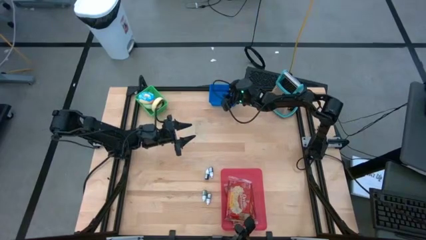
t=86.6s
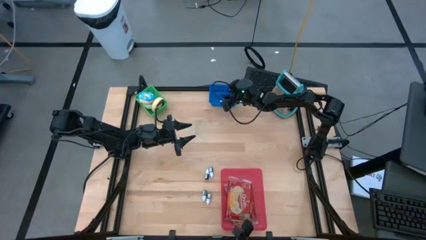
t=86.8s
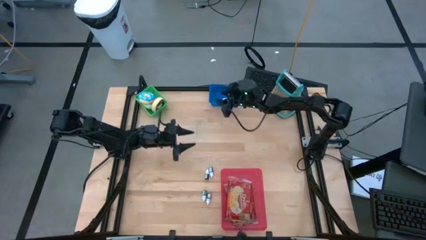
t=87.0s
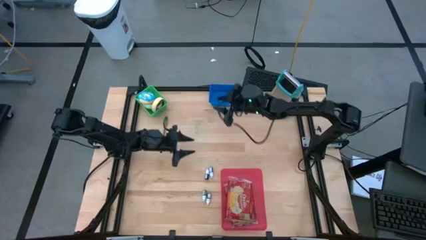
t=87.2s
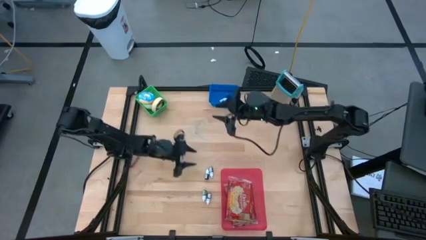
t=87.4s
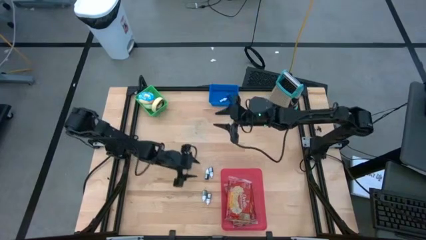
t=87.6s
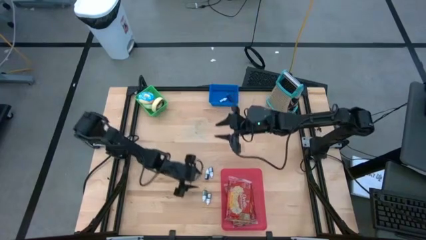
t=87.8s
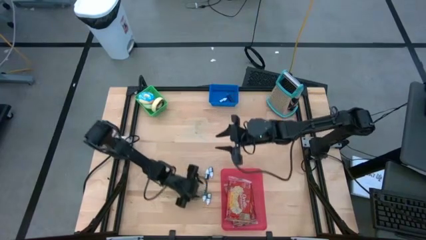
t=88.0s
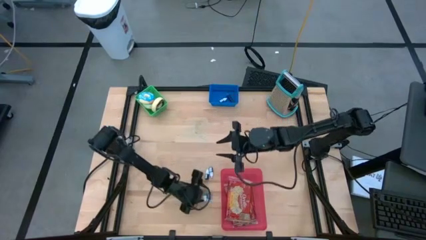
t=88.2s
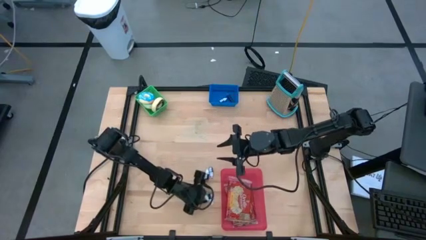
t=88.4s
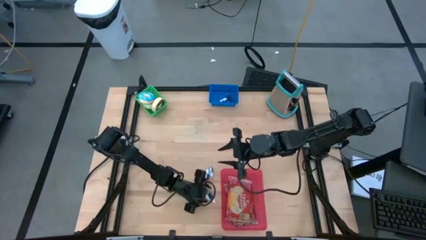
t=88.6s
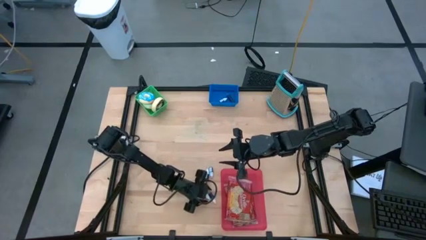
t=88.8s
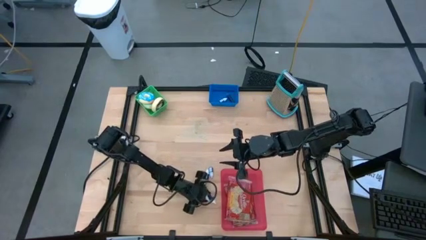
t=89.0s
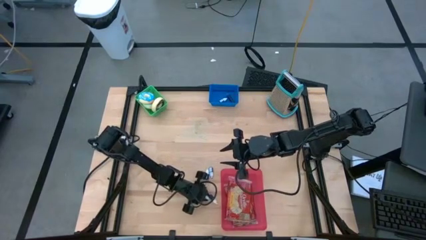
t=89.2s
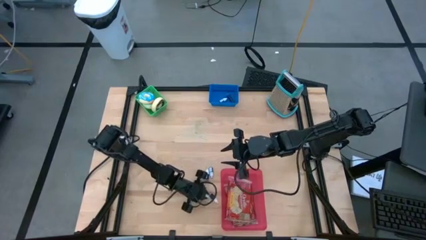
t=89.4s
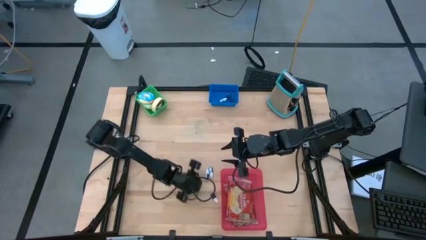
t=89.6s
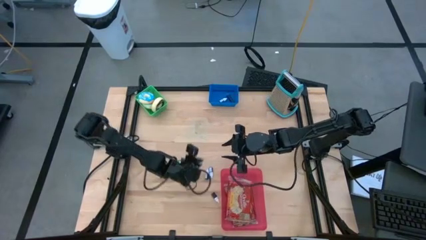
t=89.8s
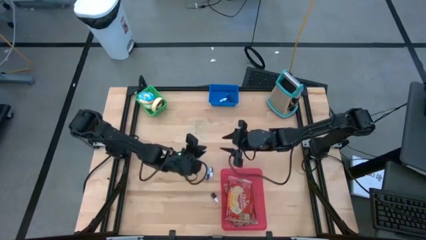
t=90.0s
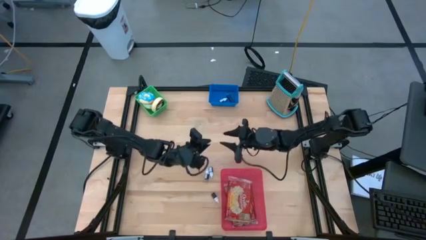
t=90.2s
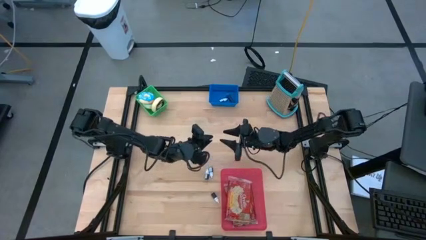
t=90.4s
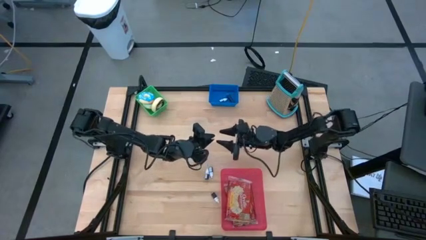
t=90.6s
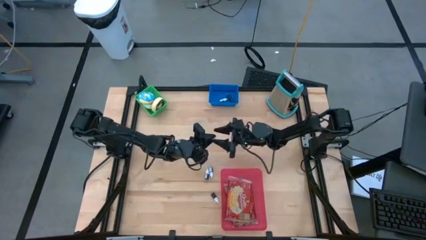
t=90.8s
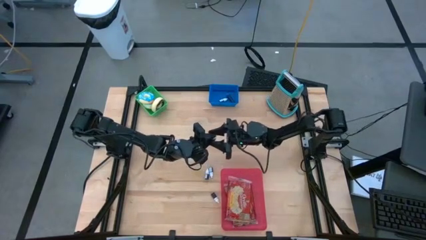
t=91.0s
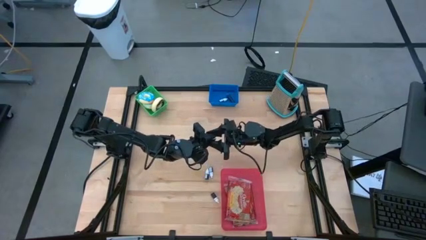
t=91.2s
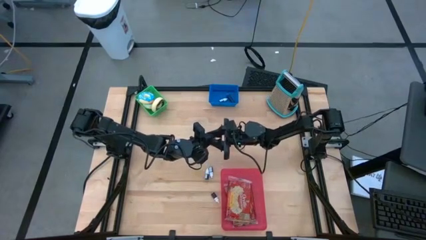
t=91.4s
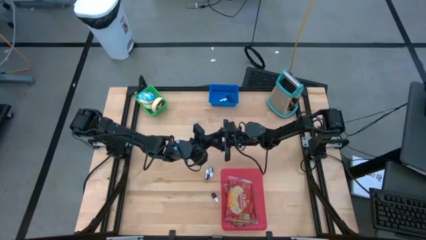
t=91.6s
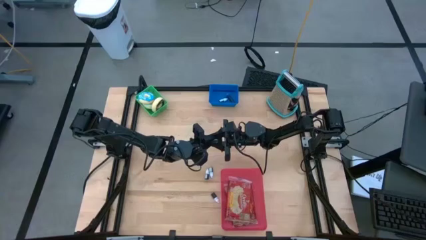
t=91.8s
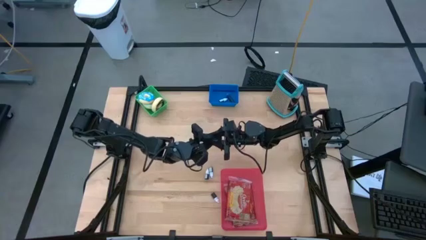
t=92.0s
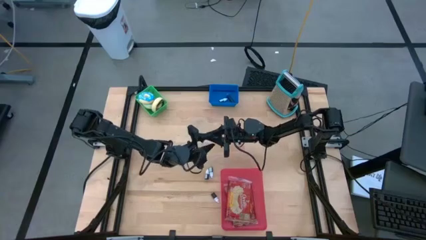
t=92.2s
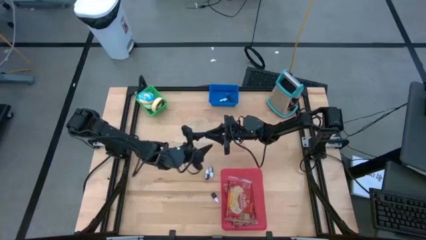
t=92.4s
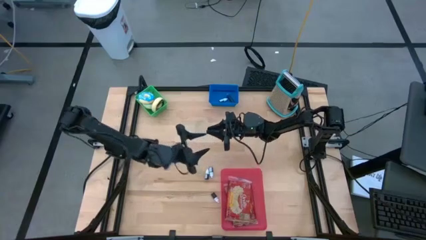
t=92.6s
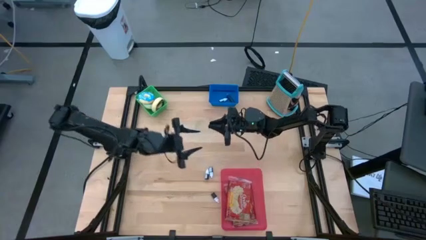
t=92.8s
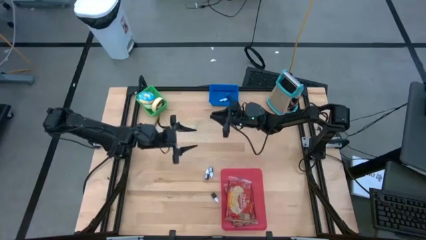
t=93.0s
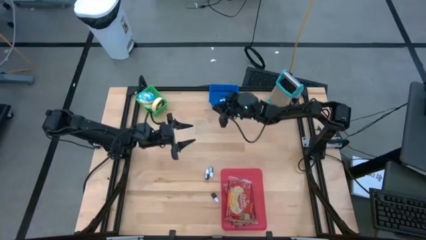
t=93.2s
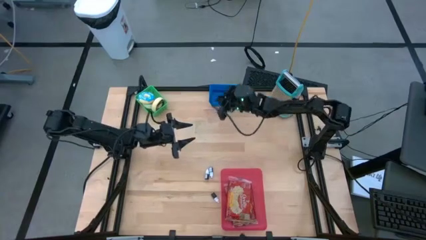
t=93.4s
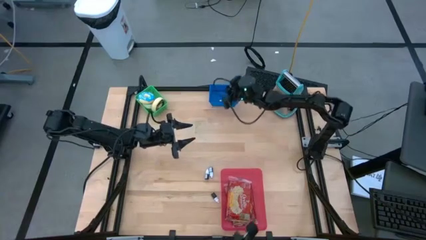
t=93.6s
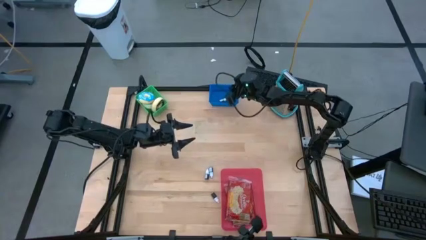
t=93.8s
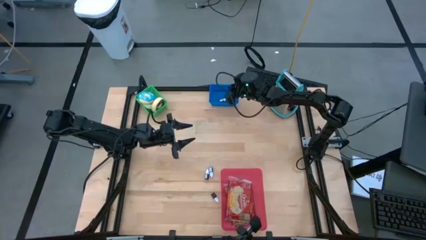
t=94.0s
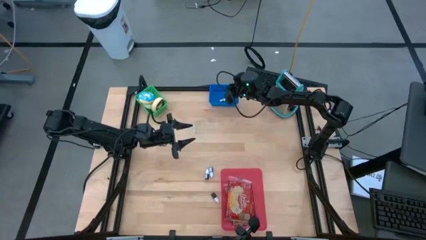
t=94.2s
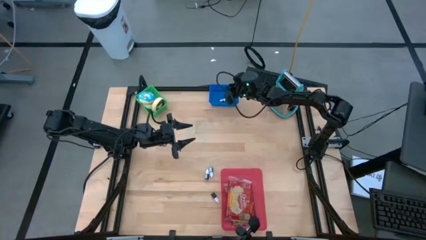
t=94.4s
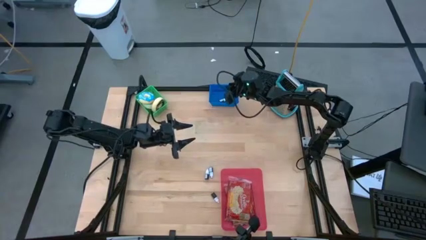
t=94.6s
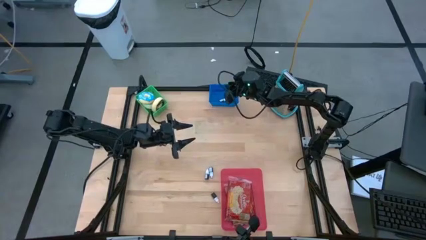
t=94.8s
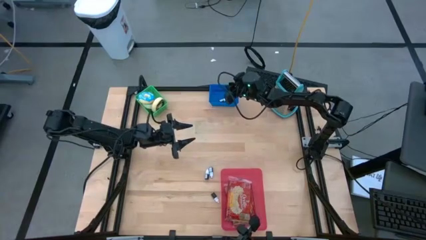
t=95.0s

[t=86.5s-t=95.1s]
Put the green food coloring into the blue bin

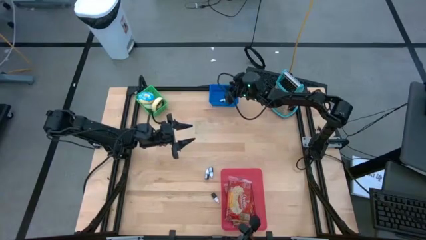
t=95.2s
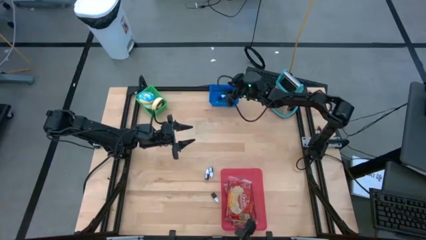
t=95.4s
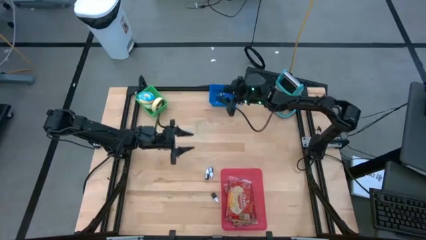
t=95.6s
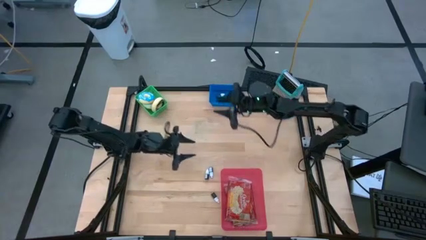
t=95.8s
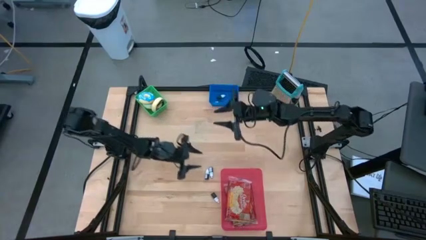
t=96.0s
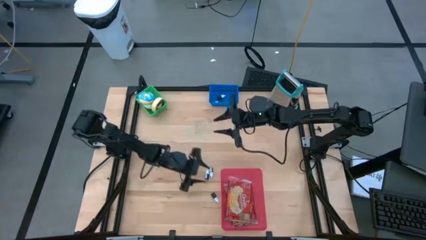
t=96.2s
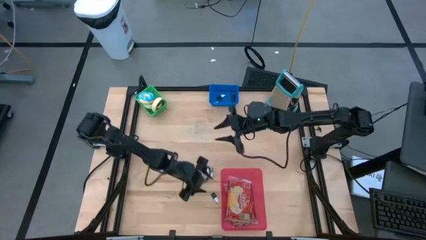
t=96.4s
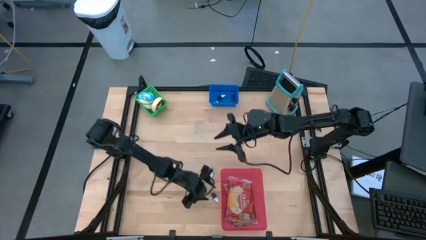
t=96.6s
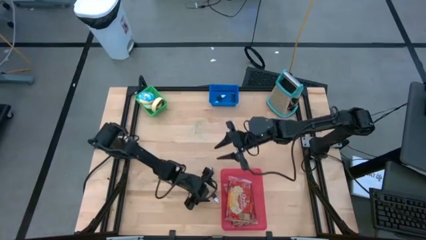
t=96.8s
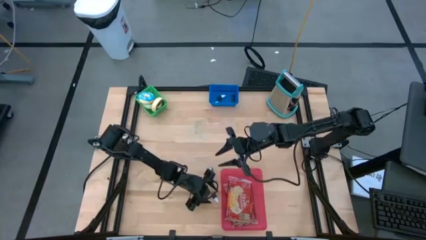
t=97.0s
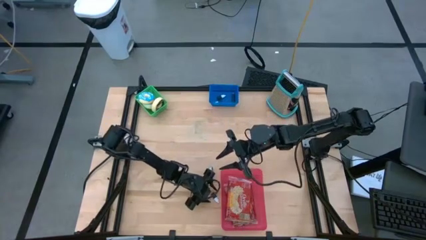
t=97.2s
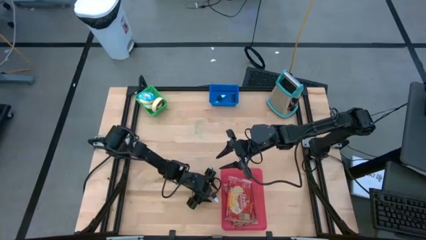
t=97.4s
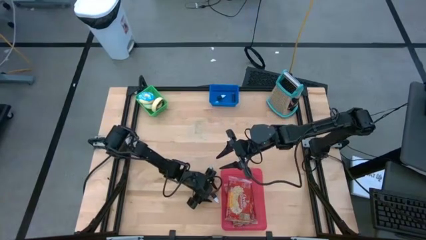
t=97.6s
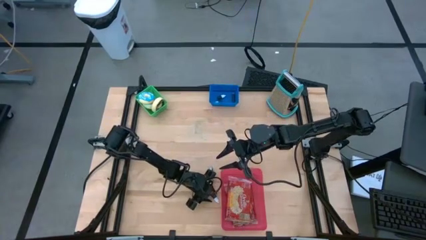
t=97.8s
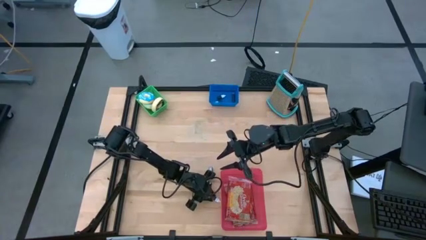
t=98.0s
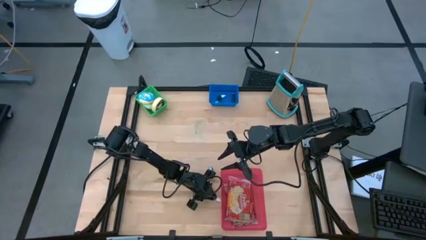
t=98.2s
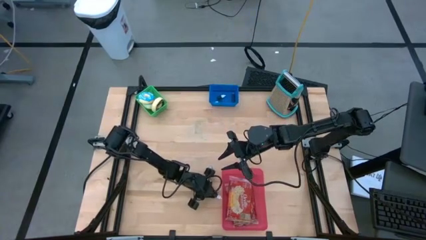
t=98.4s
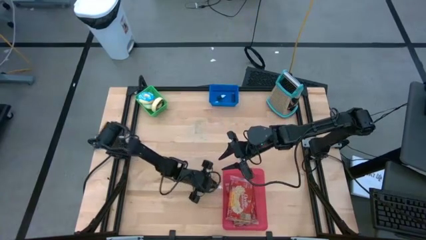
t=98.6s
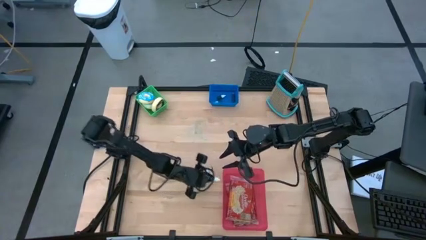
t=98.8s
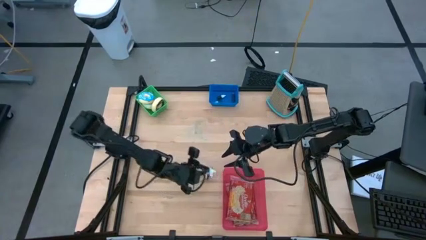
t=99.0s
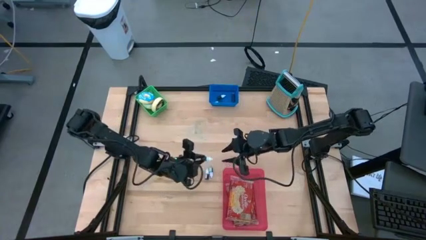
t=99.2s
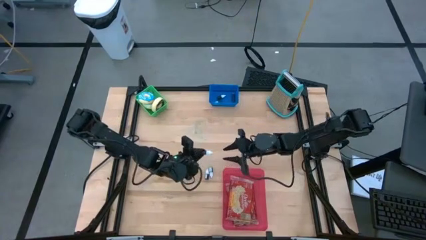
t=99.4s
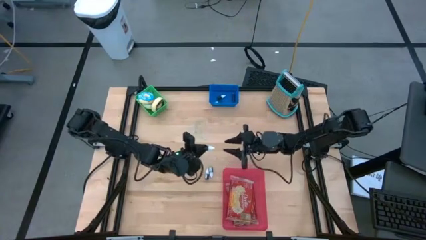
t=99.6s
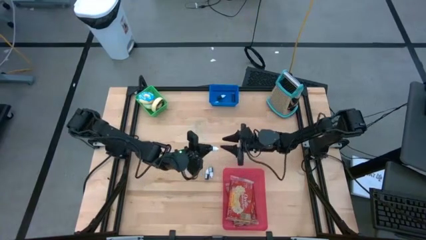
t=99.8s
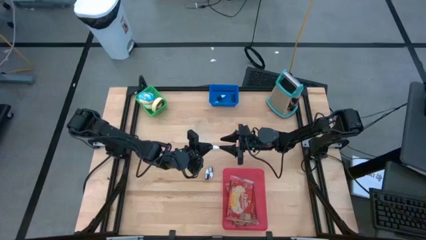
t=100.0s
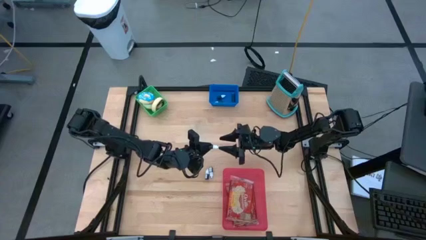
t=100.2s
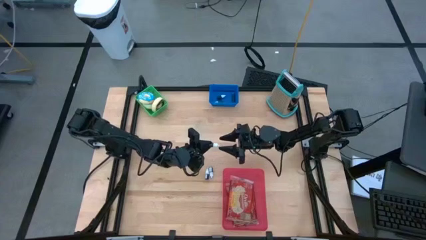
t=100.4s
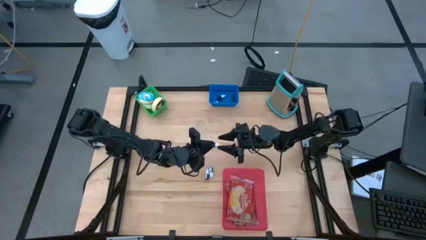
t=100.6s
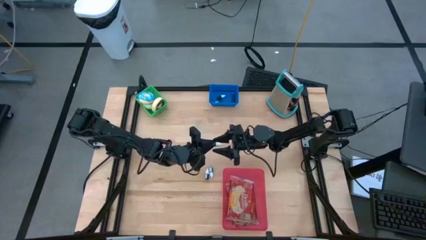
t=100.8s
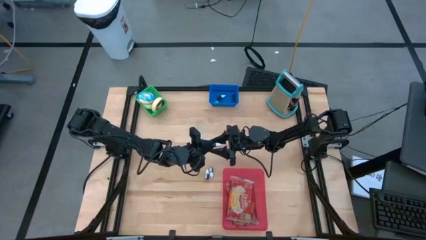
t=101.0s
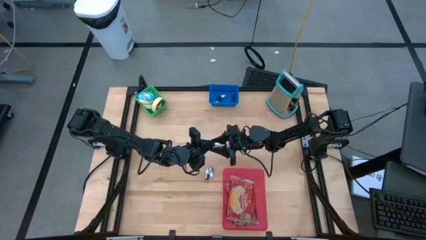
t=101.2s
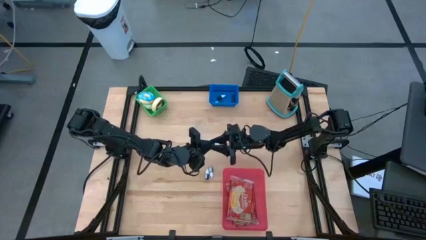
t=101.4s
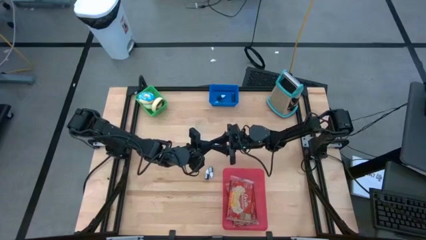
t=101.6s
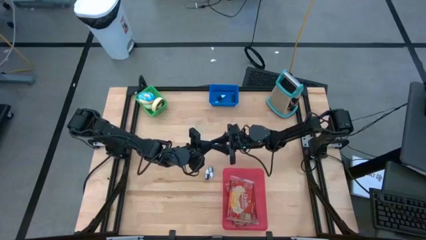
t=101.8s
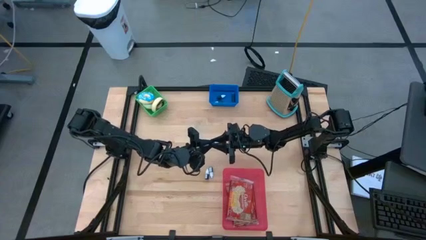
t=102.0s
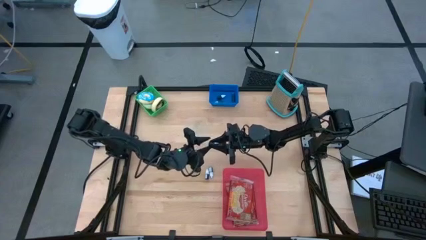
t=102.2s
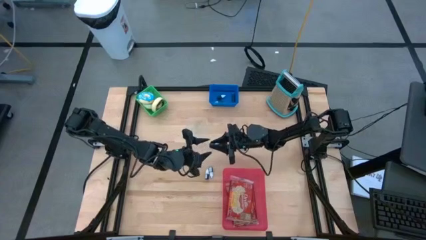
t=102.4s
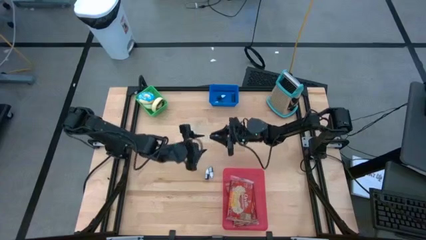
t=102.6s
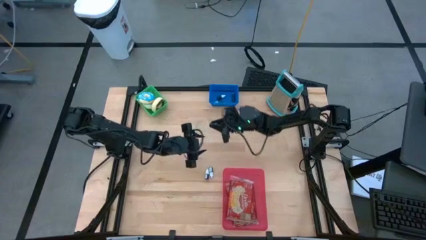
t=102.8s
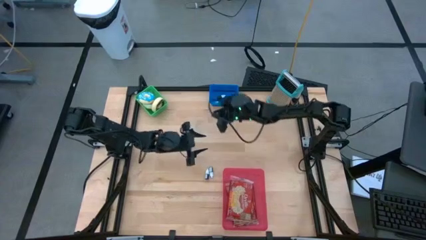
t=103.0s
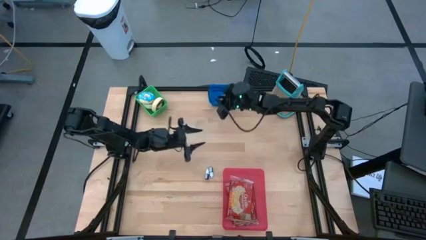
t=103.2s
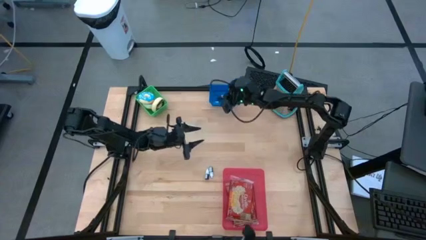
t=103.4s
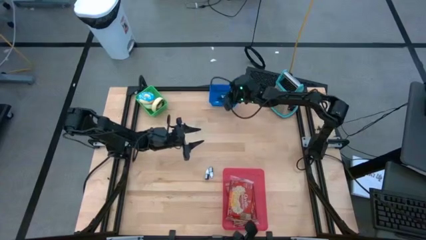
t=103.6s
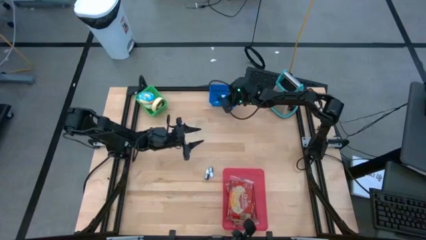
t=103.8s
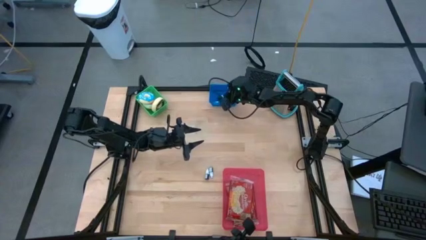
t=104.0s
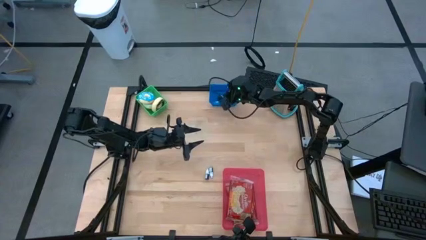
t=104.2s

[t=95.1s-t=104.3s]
Put the bottom black food coloring into the blue bin
